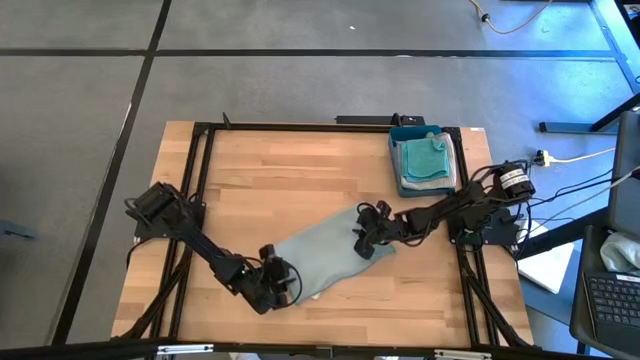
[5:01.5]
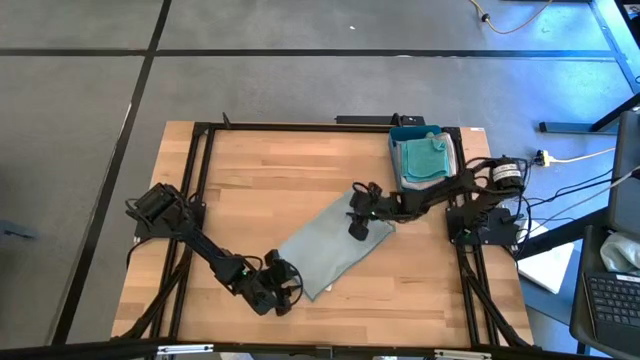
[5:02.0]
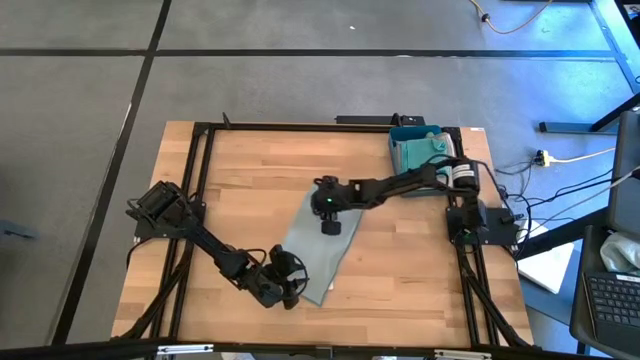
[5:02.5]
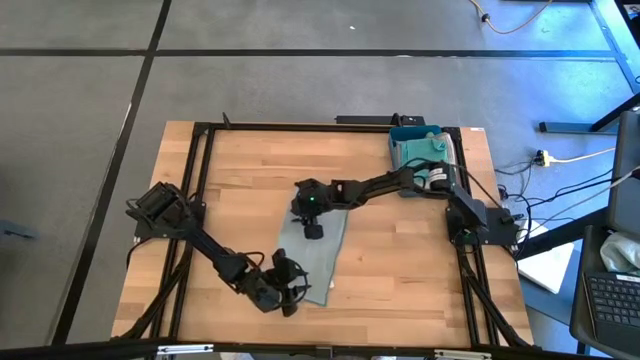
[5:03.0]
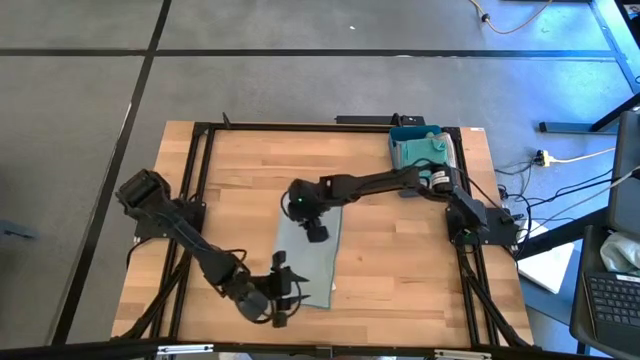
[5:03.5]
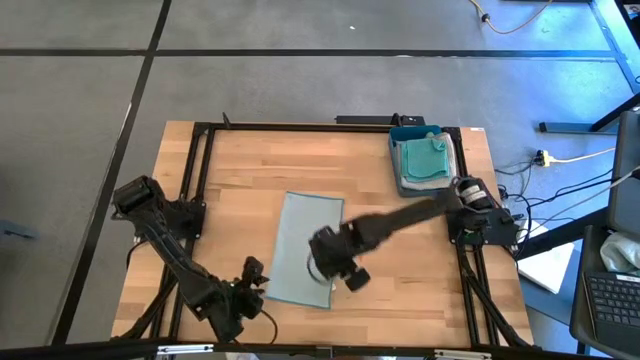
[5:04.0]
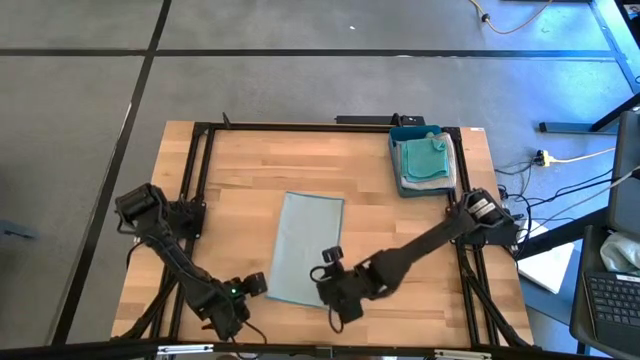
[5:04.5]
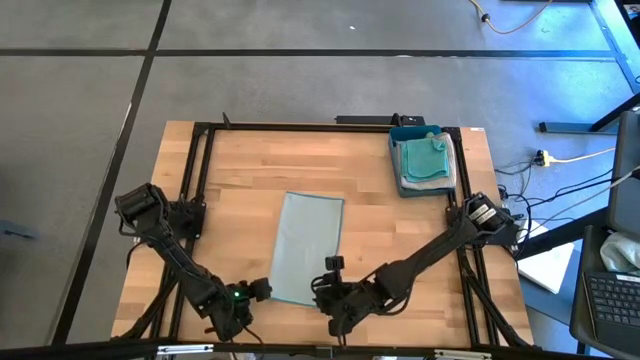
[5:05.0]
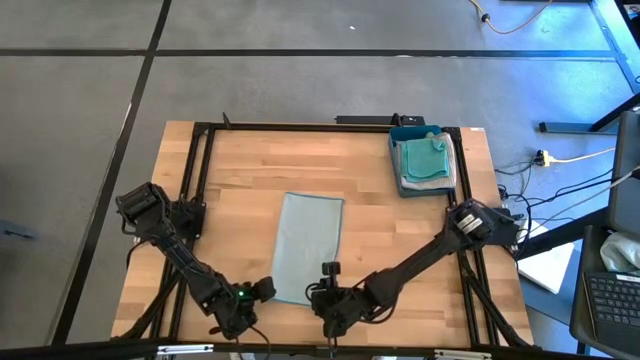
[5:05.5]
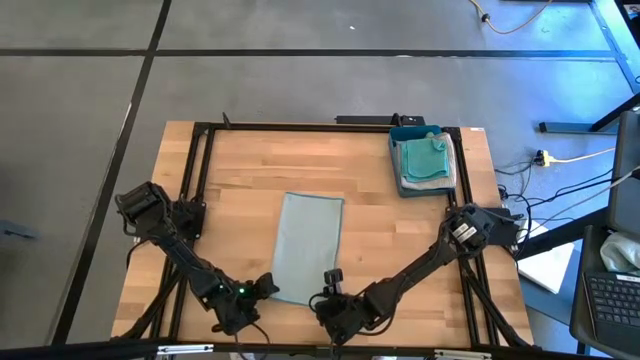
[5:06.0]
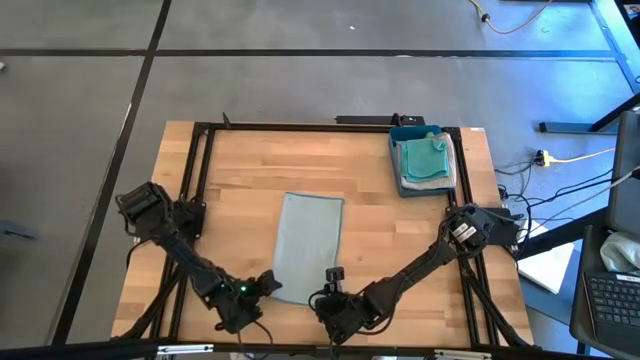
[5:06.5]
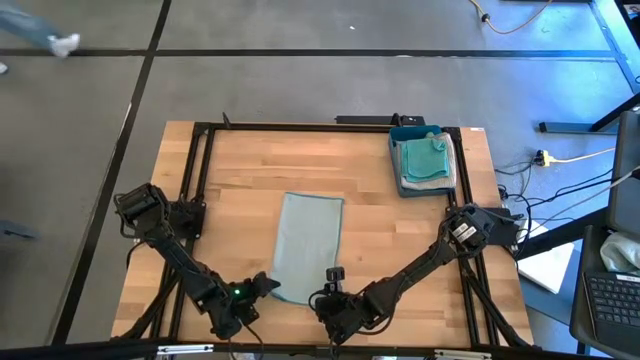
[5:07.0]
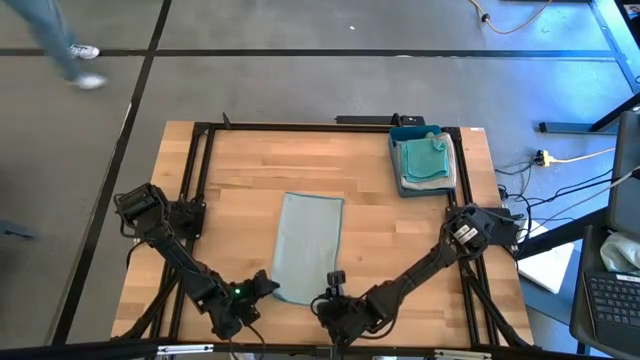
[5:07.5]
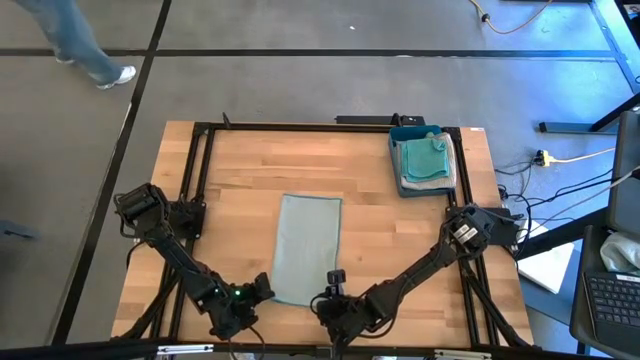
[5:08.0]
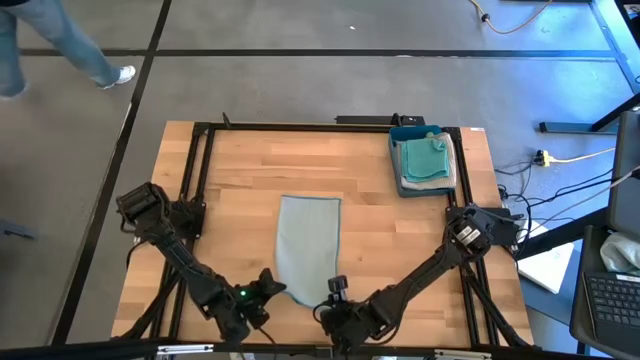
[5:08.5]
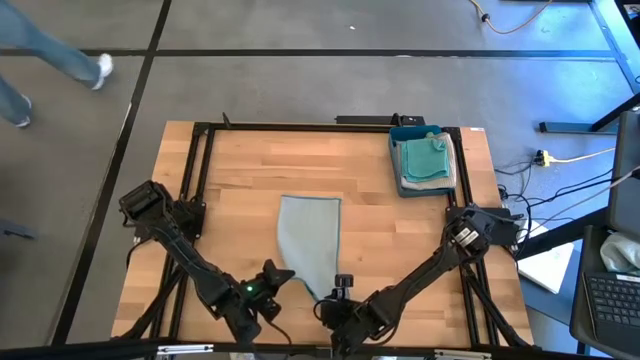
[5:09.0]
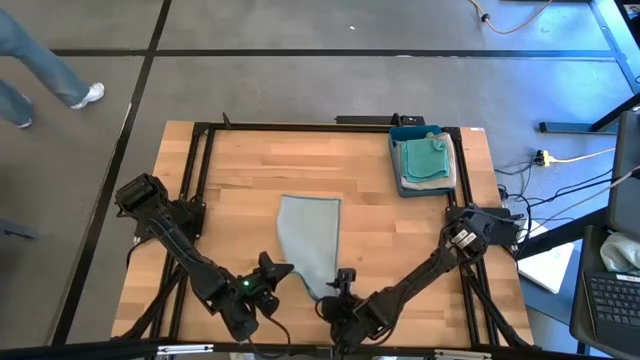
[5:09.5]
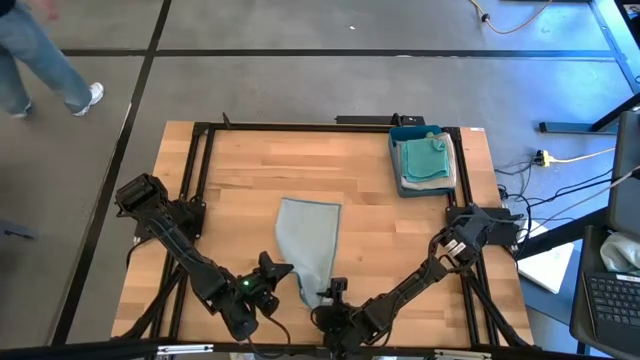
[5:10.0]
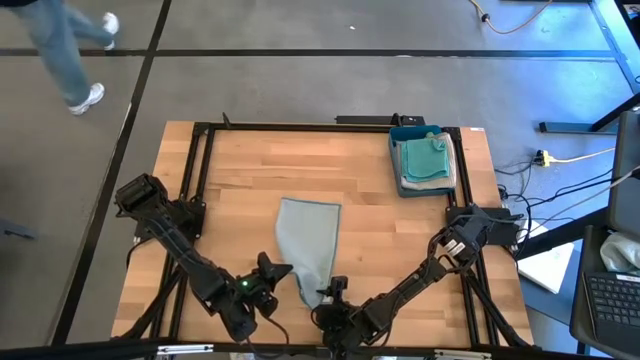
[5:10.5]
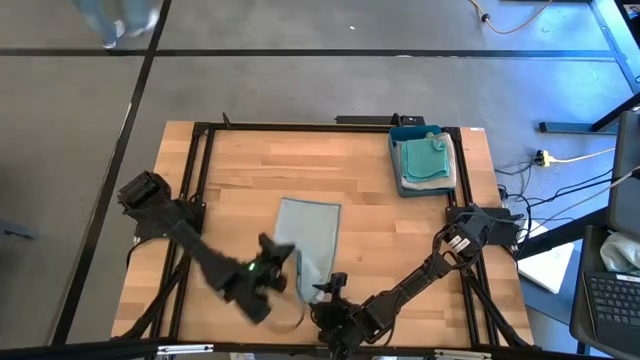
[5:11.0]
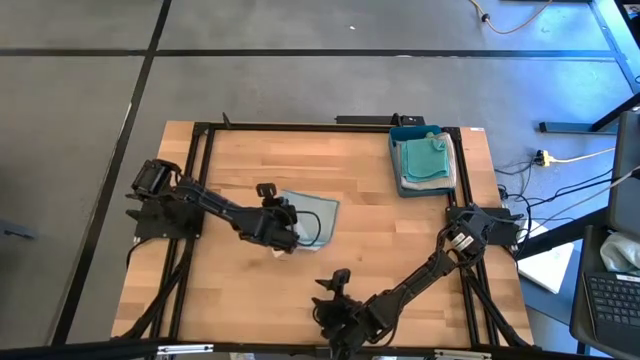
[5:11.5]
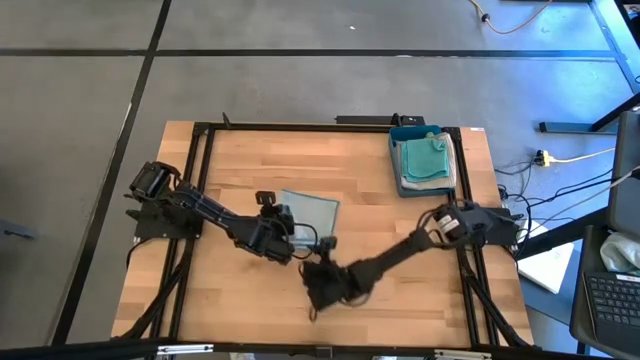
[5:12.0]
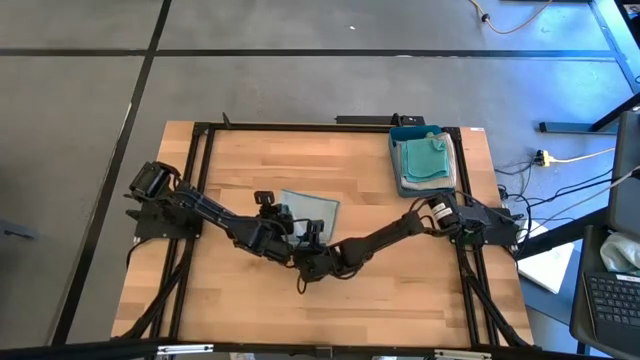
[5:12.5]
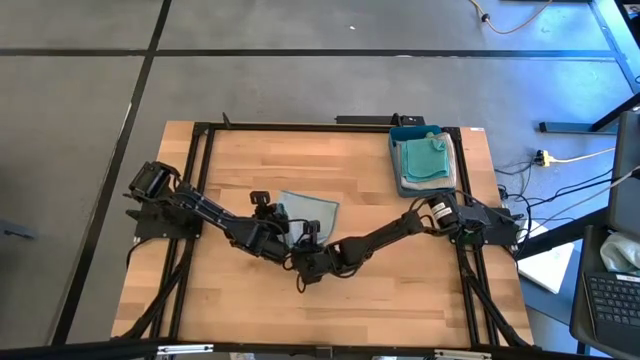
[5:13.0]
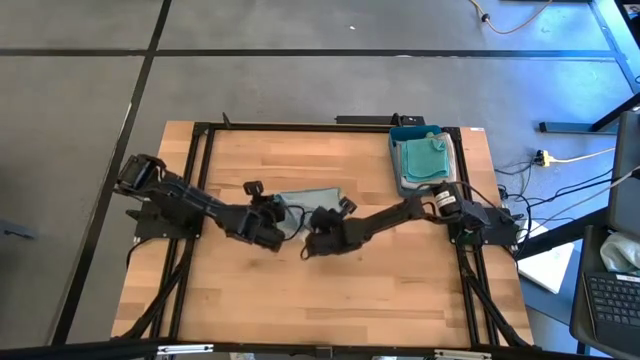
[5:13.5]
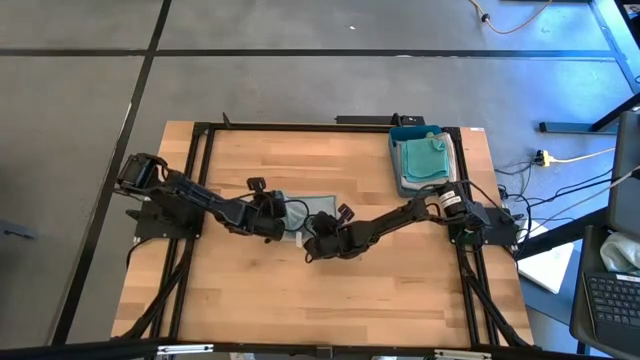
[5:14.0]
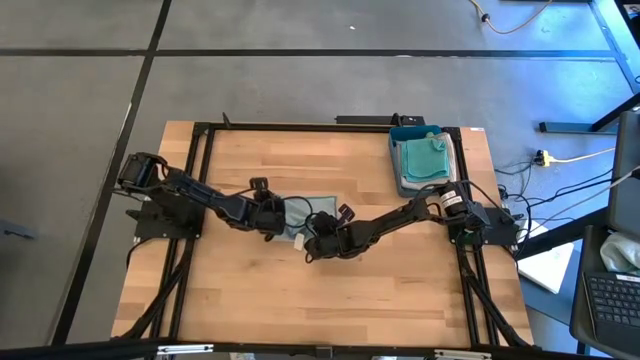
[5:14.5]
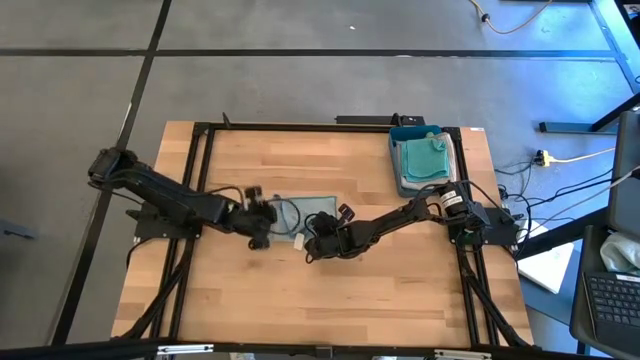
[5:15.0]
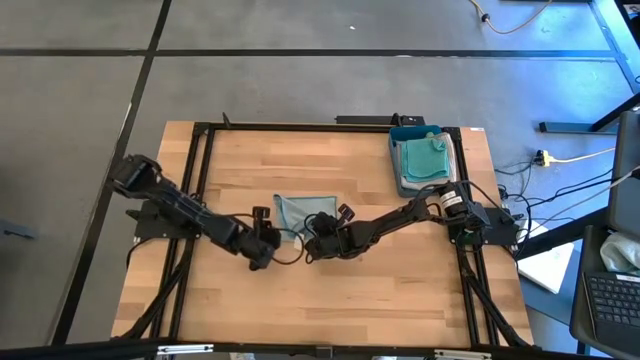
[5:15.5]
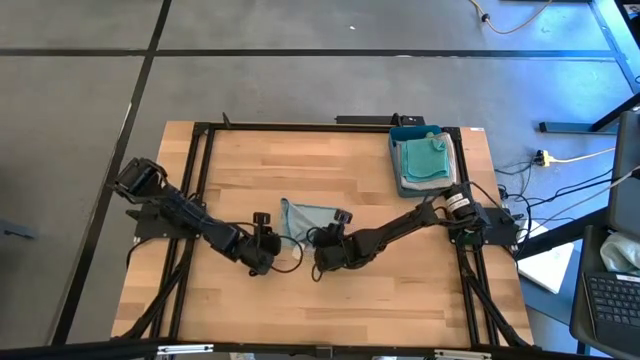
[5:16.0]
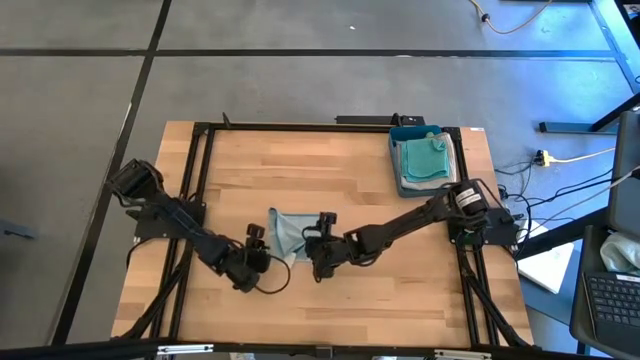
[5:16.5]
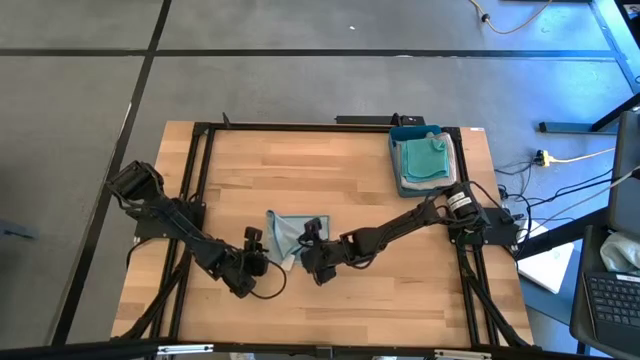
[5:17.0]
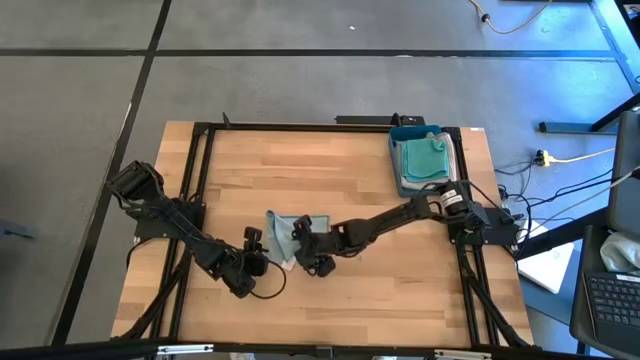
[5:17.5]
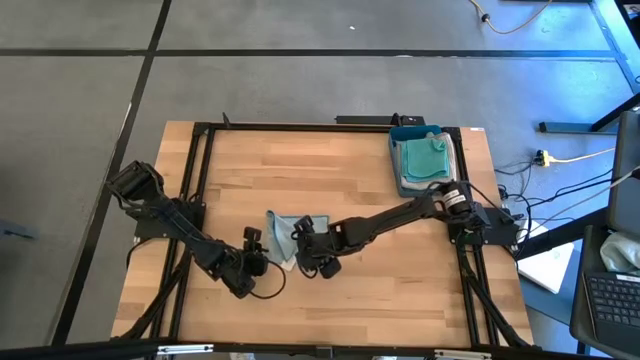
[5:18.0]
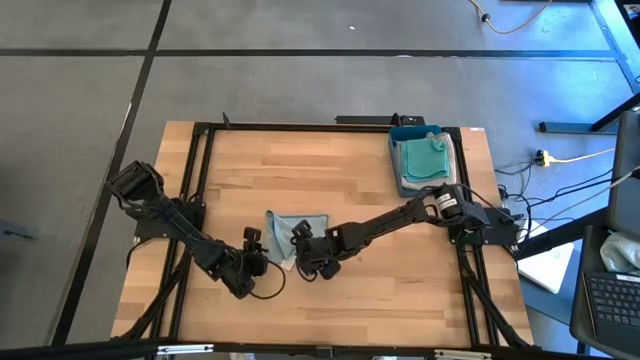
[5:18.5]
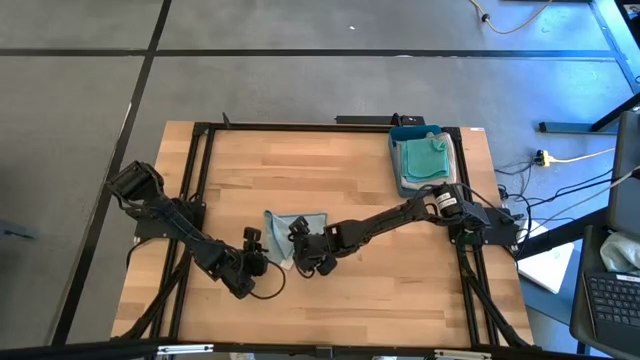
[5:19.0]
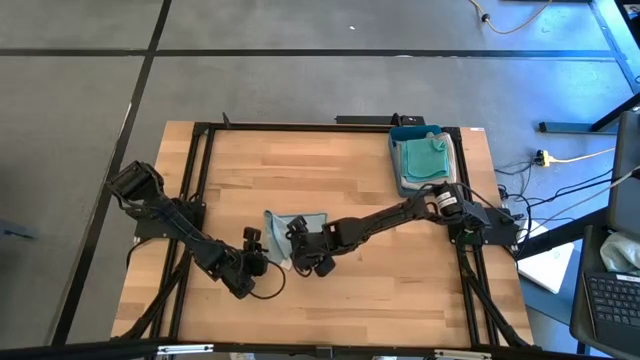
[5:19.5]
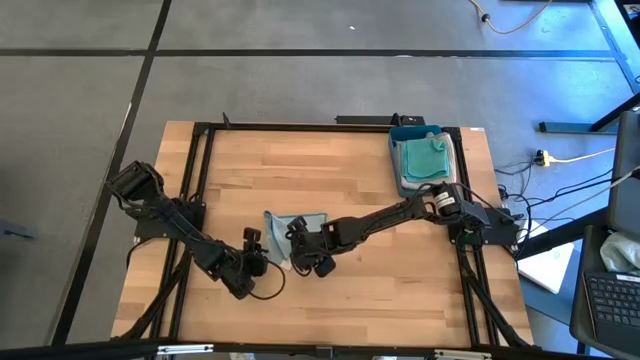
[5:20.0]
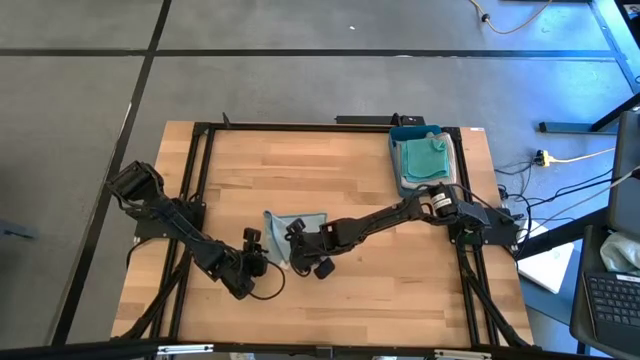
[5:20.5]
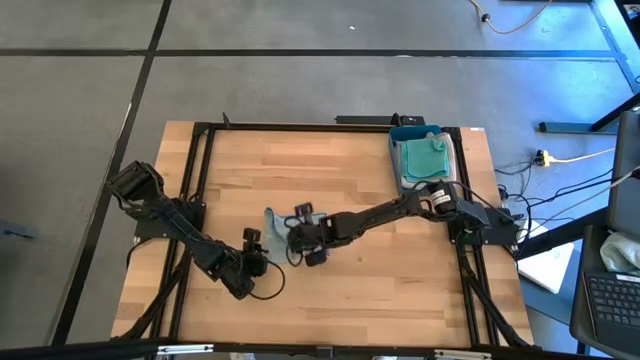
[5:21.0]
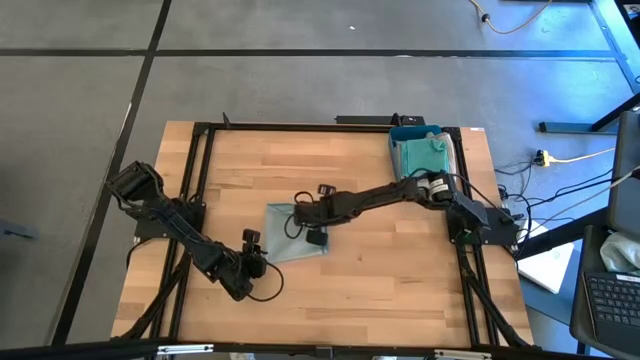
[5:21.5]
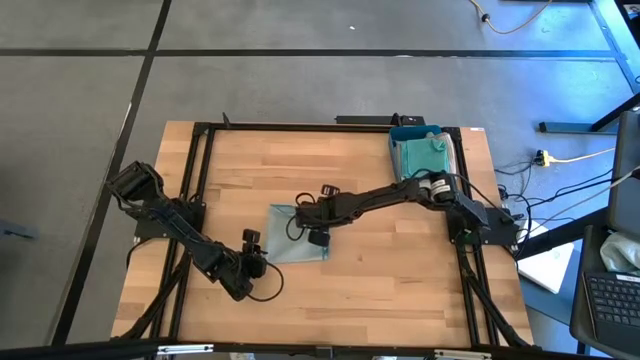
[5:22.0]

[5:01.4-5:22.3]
Task: Fold microfiber towels
Fold the light blue microfiber cloth

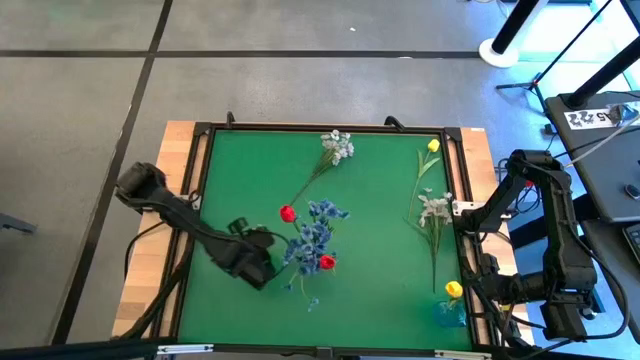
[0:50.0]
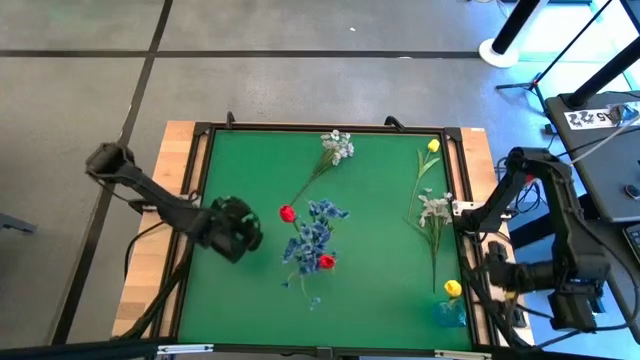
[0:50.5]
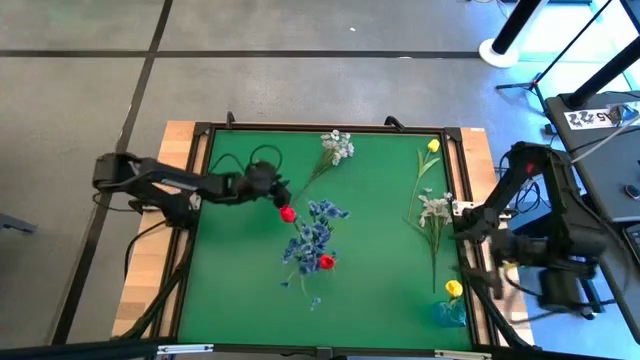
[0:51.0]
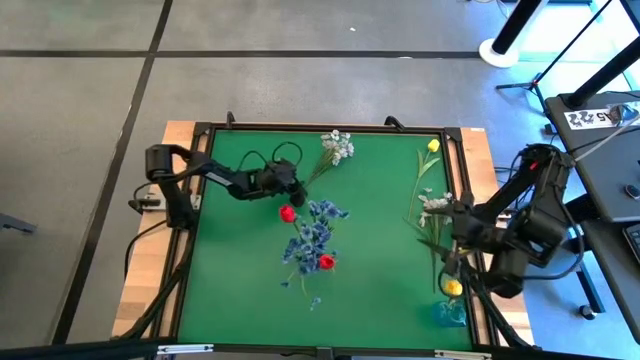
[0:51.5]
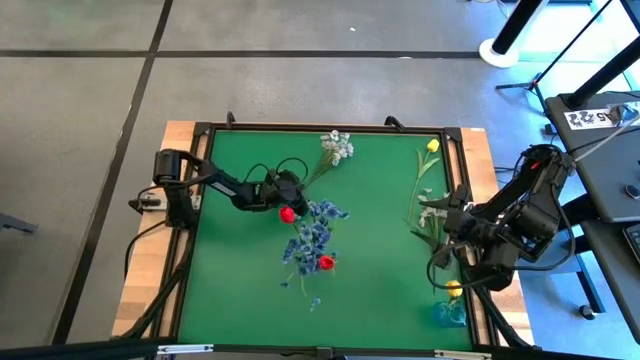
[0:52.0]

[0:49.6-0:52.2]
Task: Sort flowers into vase by color
Put the top white flowers into the blue vase
